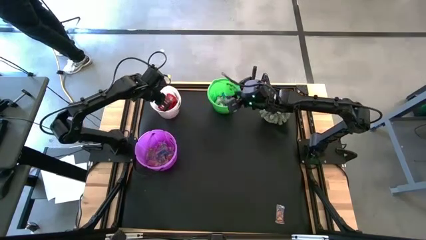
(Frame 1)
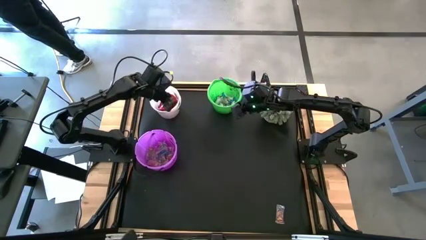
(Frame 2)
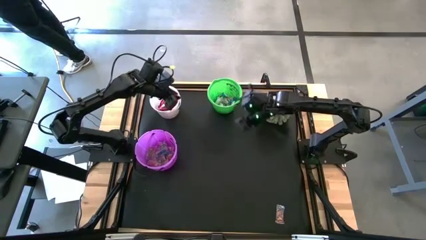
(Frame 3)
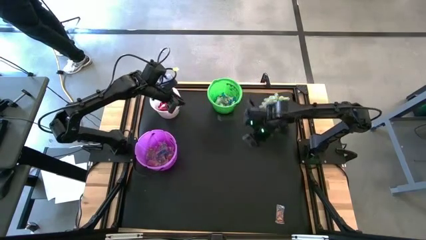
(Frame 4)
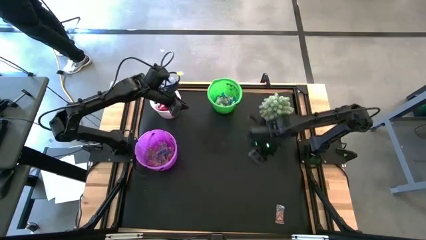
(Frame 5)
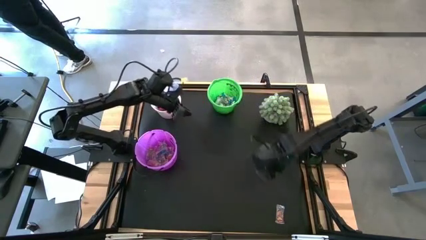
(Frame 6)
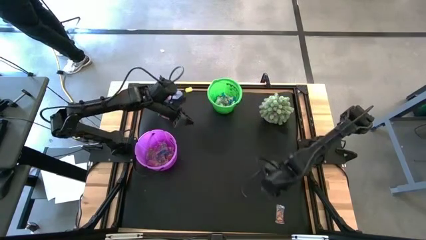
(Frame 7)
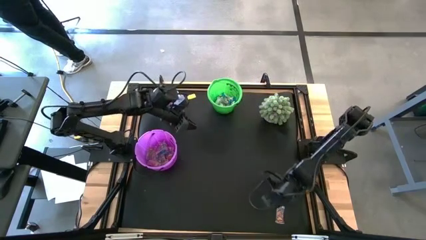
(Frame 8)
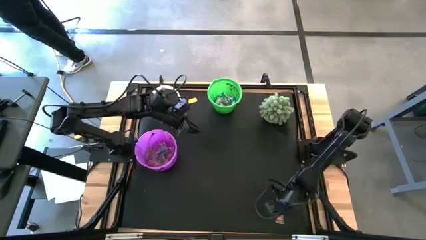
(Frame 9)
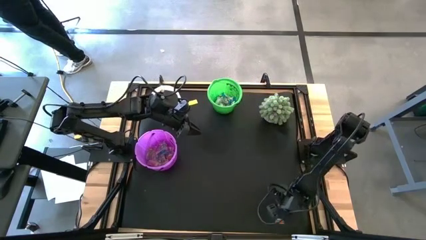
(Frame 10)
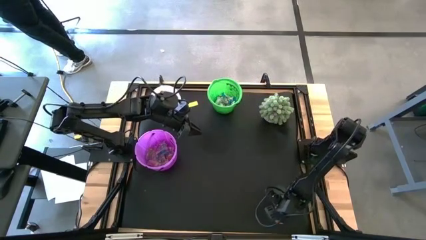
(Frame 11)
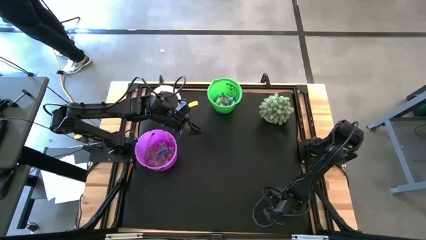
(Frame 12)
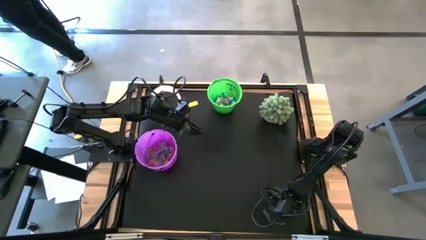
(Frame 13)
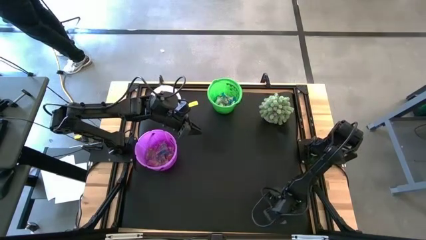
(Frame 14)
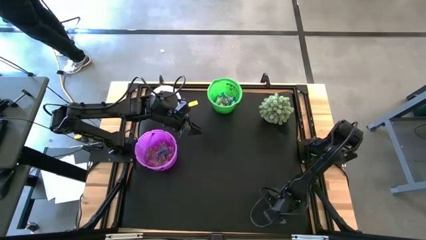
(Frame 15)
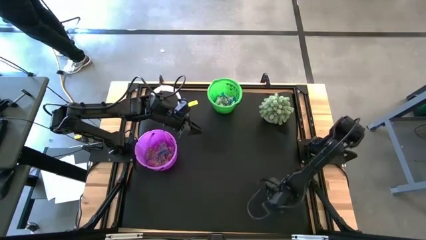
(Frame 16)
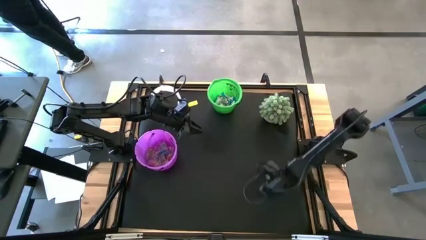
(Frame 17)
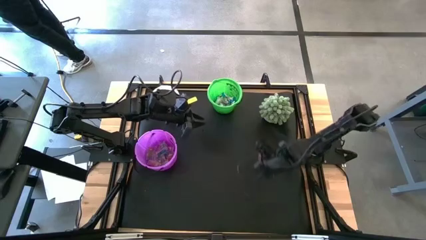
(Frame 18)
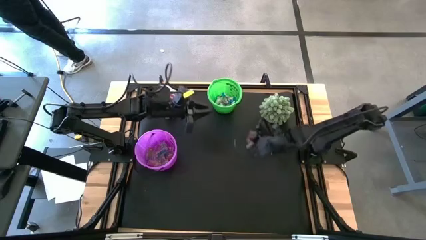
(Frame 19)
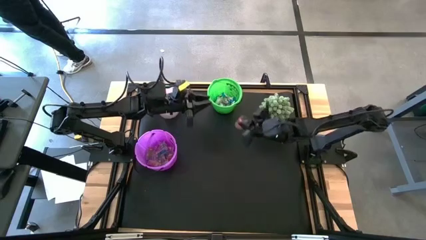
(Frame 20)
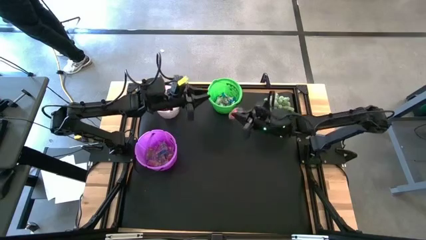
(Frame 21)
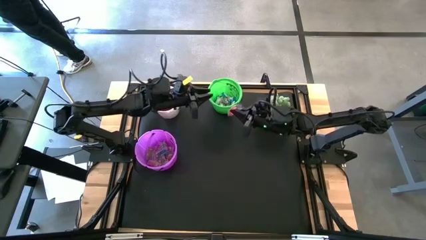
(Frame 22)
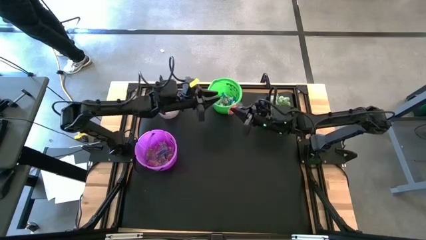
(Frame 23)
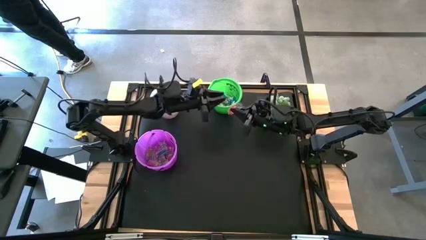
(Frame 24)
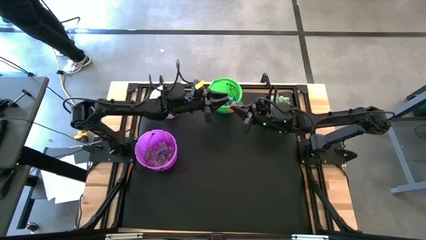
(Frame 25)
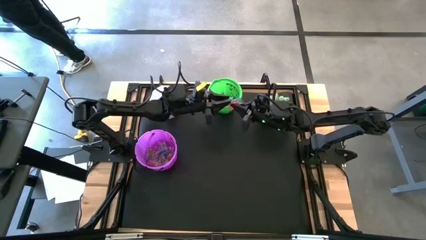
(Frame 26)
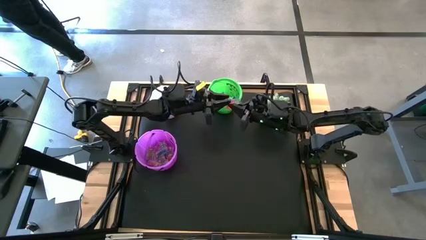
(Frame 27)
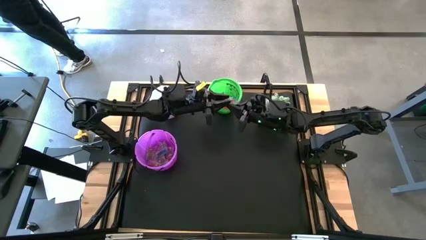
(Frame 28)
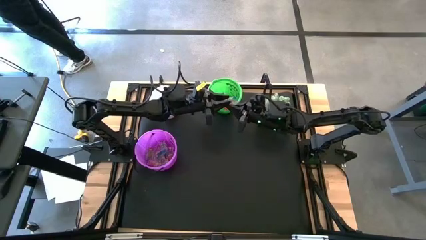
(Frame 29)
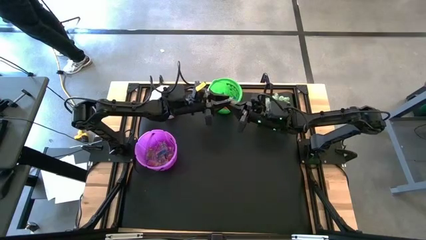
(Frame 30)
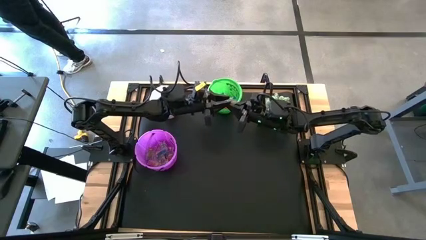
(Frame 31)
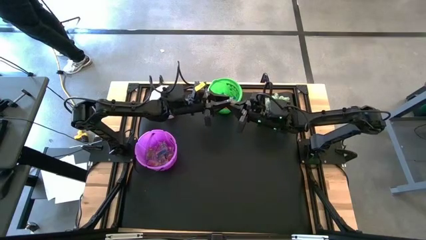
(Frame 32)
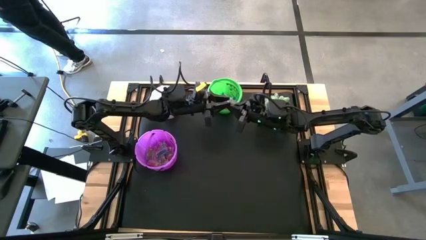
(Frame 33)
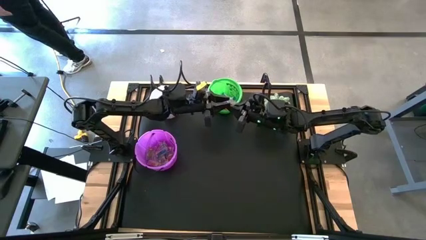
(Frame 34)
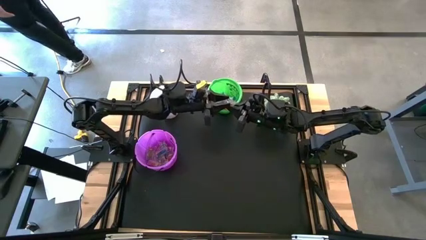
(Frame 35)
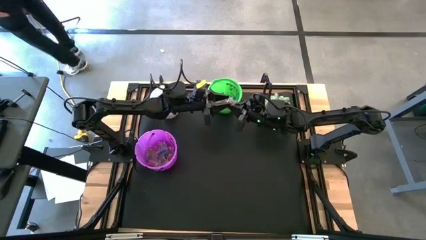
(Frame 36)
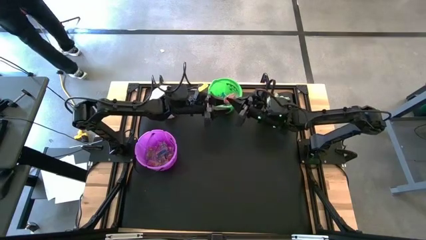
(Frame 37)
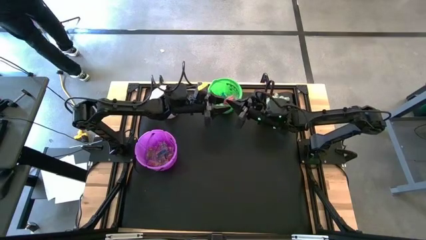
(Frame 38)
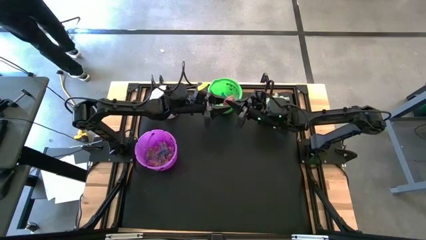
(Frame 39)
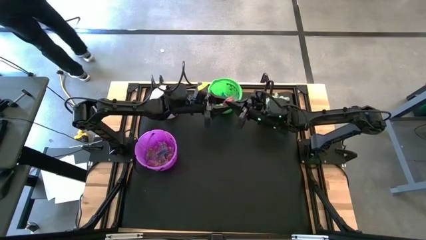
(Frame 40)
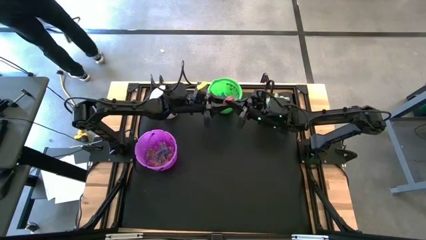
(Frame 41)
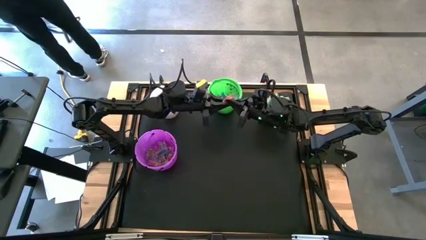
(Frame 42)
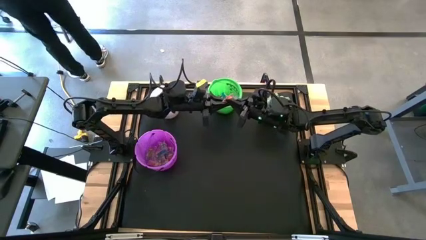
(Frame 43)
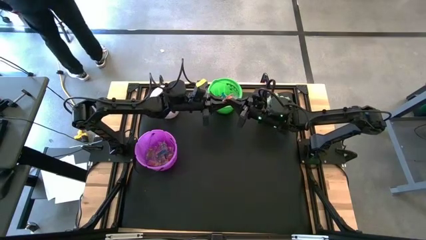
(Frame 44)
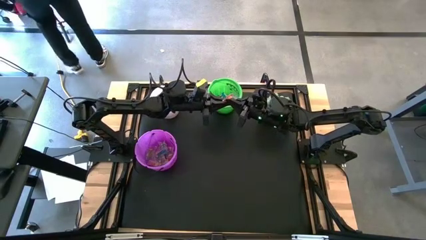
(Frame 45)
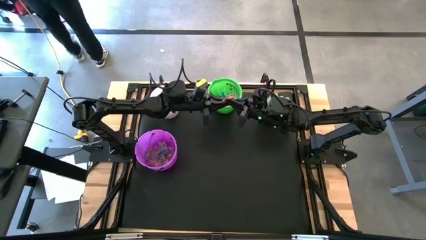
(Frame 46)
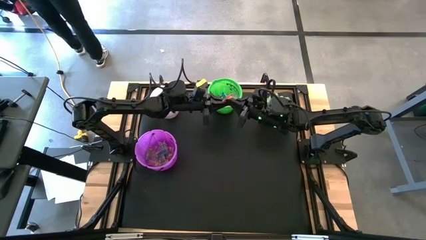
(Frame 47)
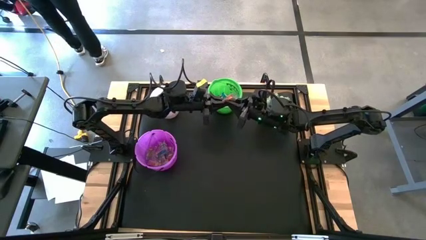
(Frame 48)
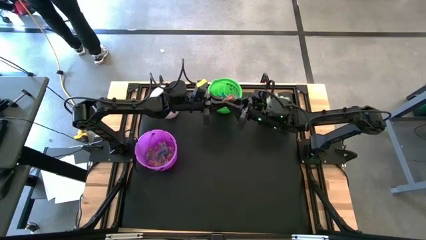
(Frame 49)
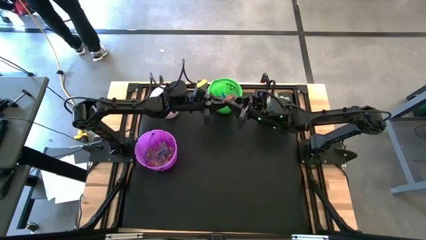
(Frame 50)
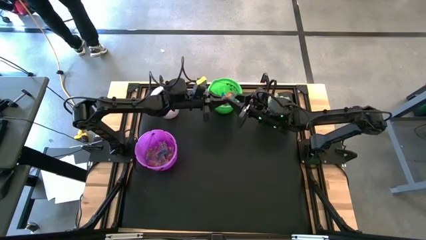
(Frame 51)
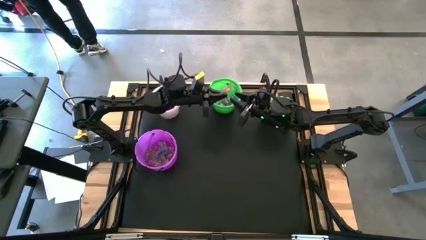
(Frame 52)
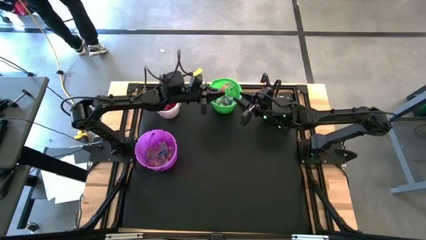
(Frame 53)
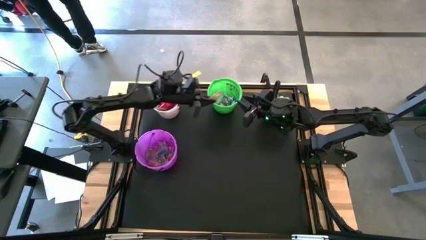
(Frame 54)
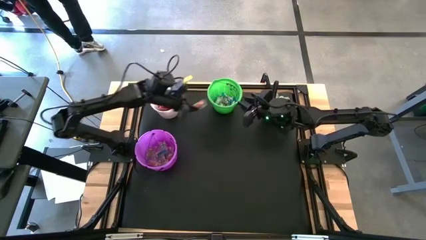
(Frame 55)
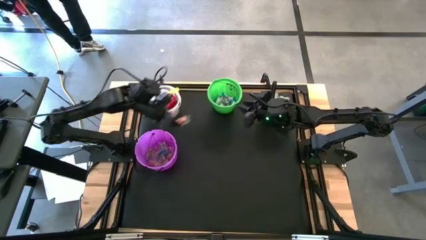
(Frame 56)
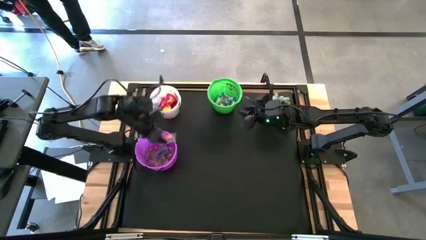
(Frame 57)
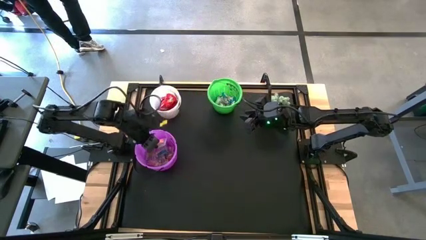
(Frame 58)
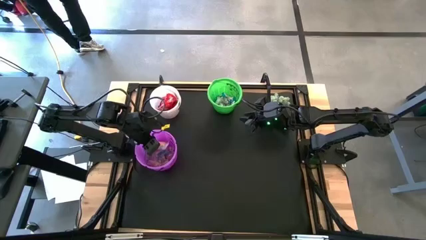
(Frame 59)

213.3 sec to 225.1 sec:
Task: Sort candy
Put the orange gummy into the violet bucket
